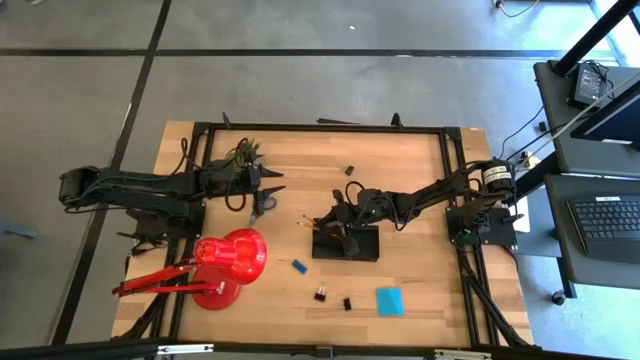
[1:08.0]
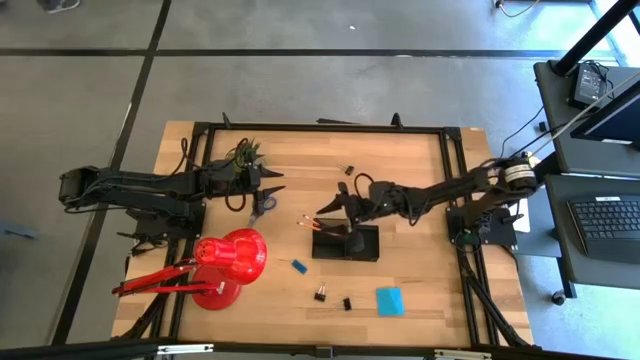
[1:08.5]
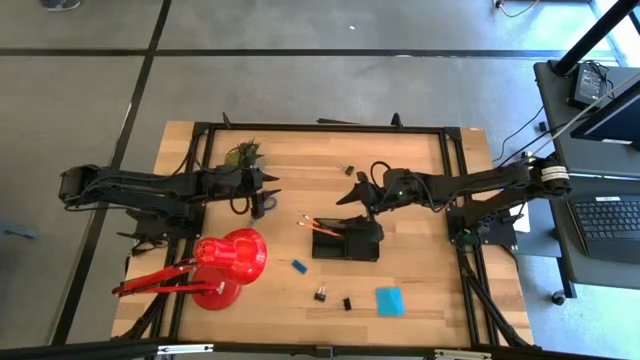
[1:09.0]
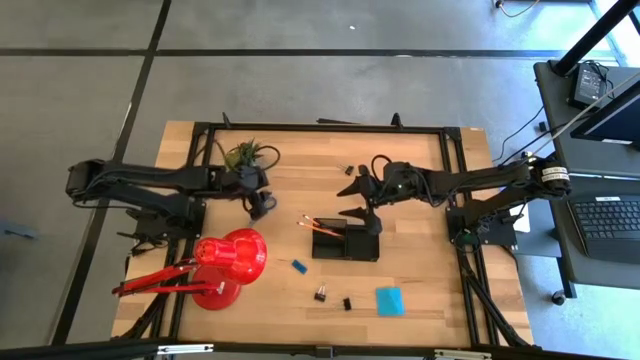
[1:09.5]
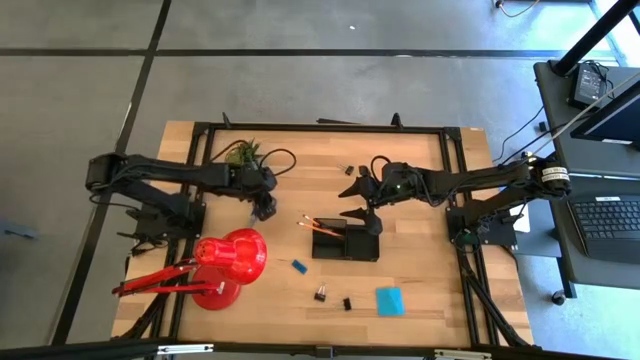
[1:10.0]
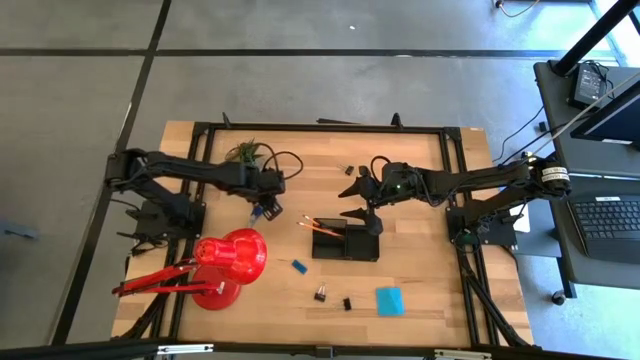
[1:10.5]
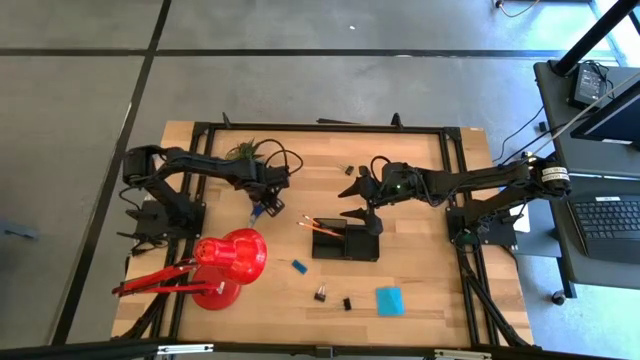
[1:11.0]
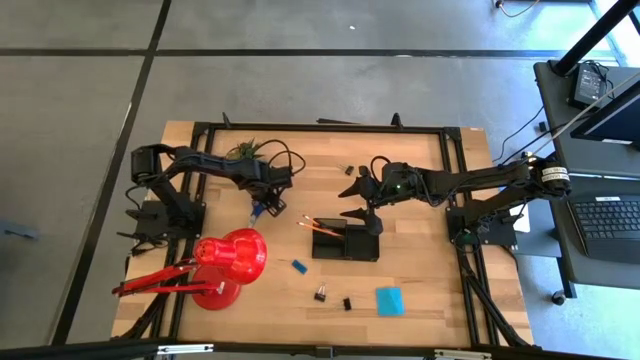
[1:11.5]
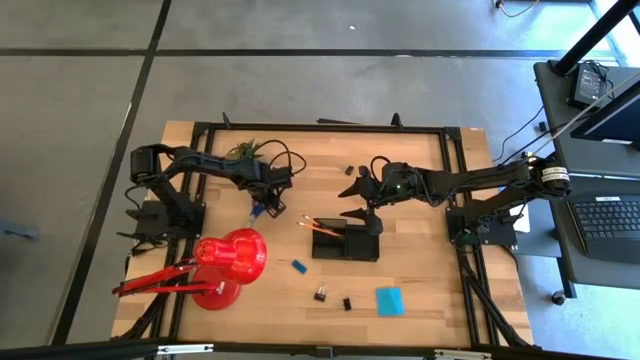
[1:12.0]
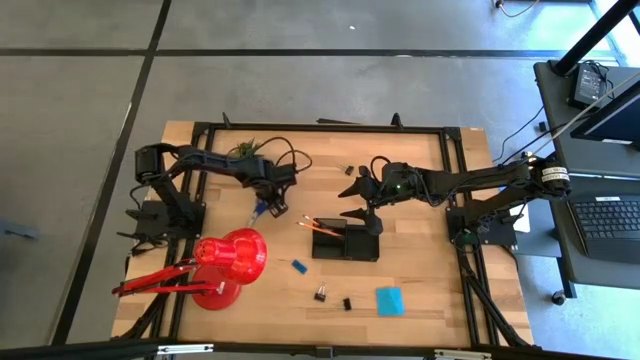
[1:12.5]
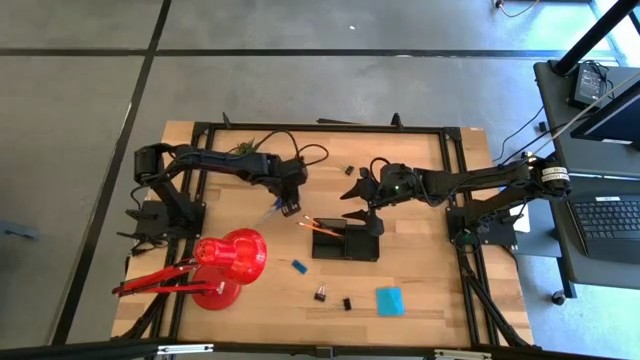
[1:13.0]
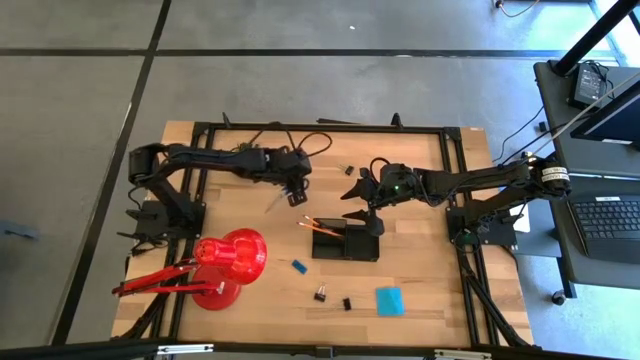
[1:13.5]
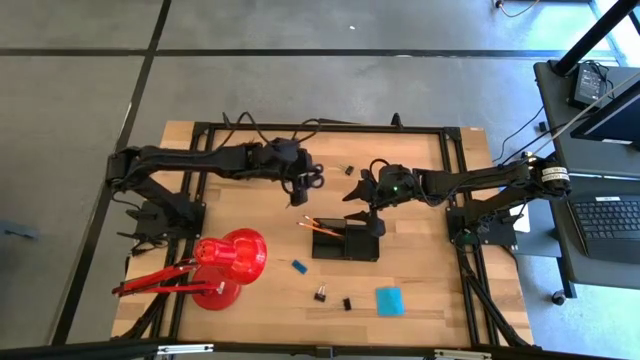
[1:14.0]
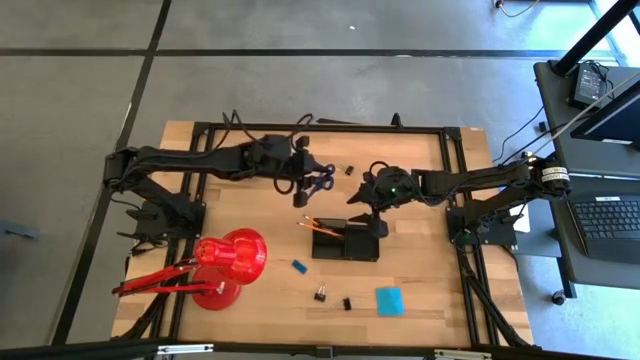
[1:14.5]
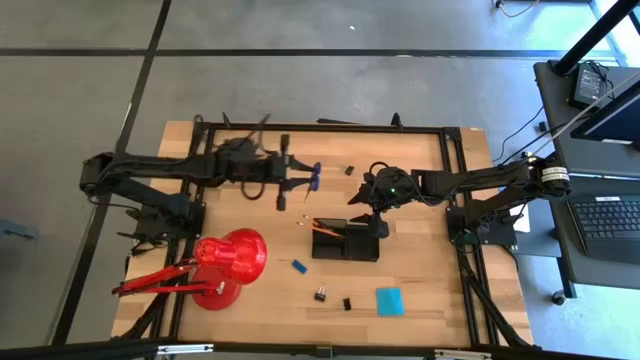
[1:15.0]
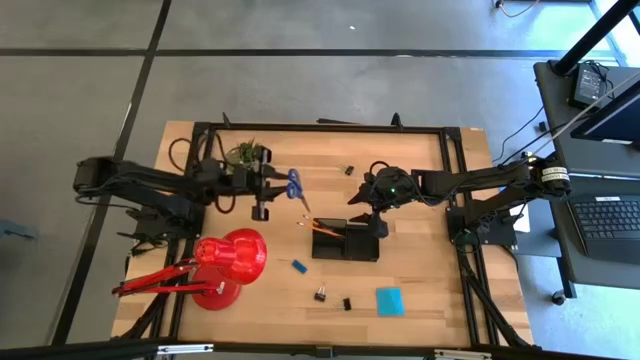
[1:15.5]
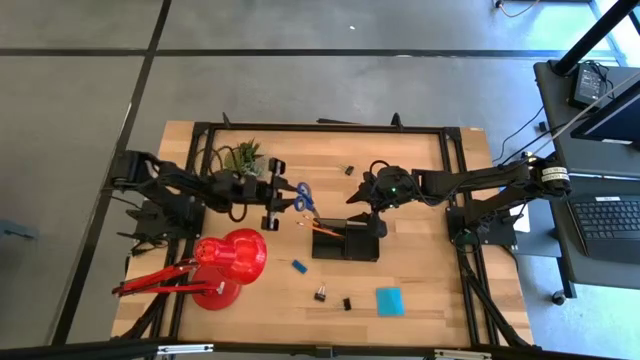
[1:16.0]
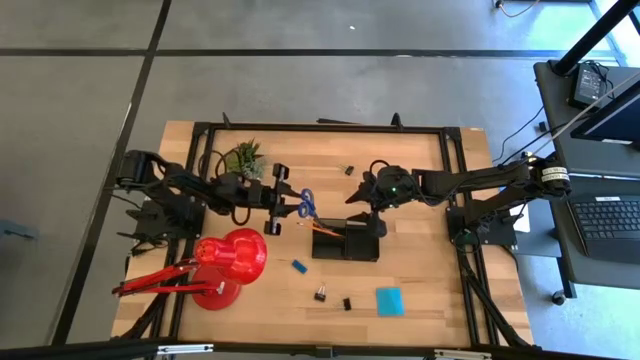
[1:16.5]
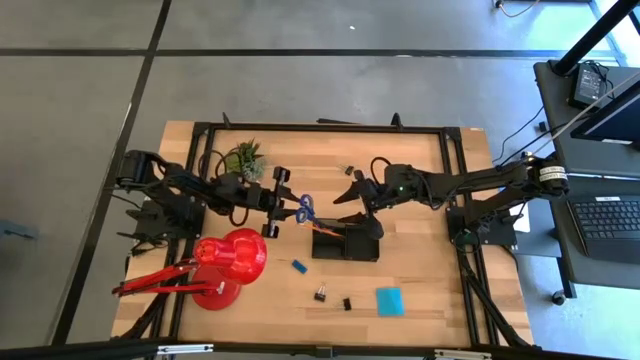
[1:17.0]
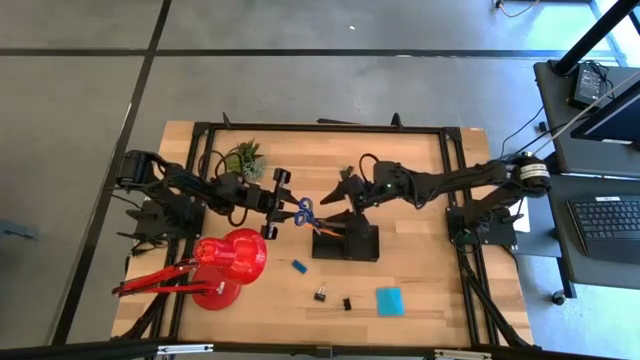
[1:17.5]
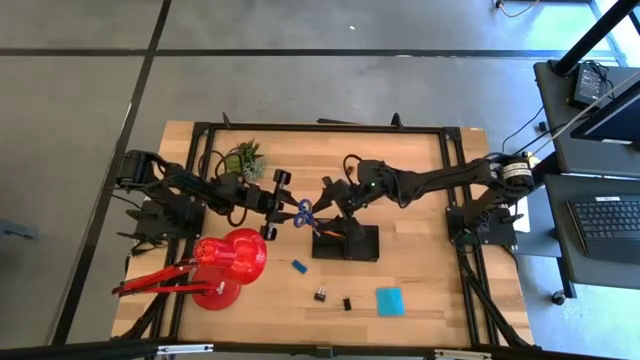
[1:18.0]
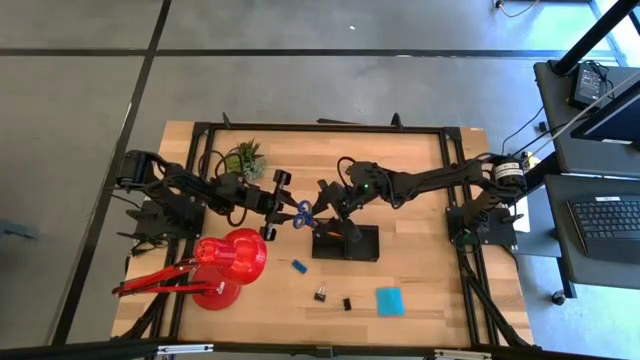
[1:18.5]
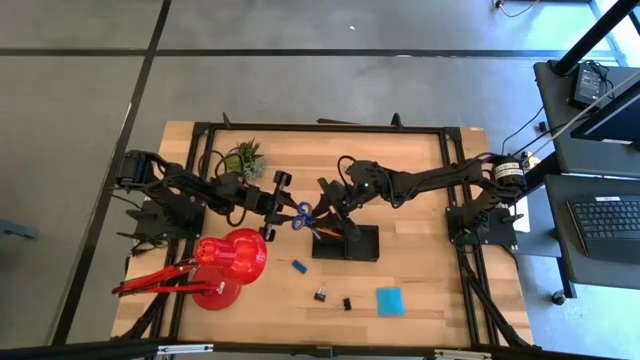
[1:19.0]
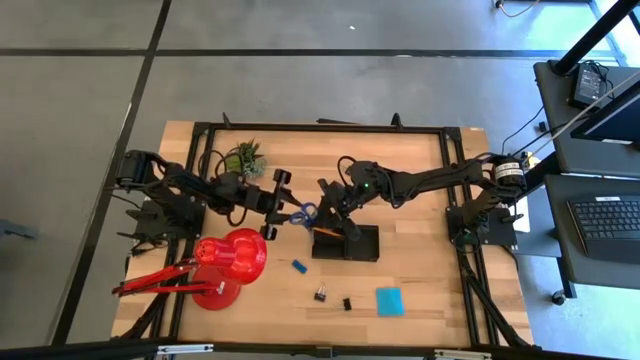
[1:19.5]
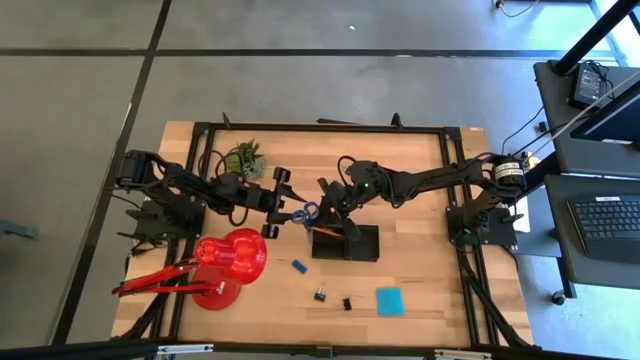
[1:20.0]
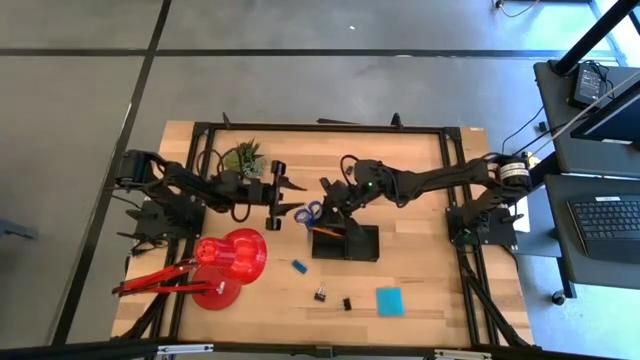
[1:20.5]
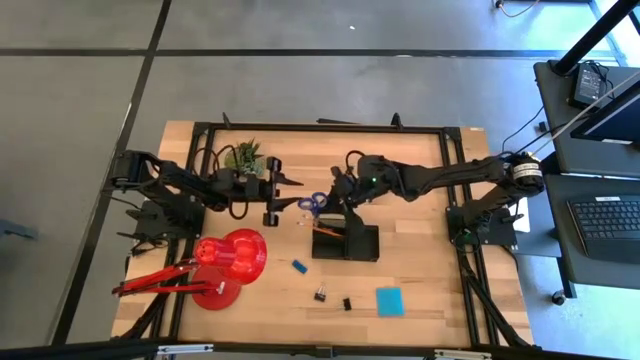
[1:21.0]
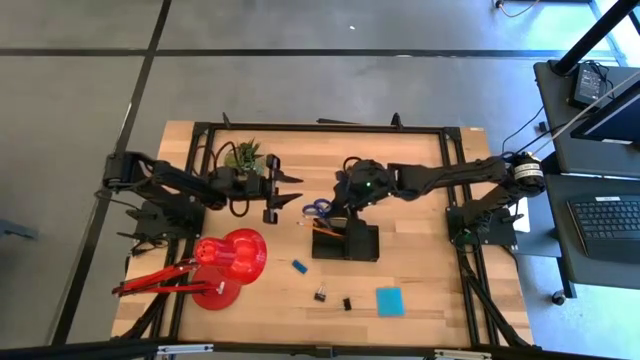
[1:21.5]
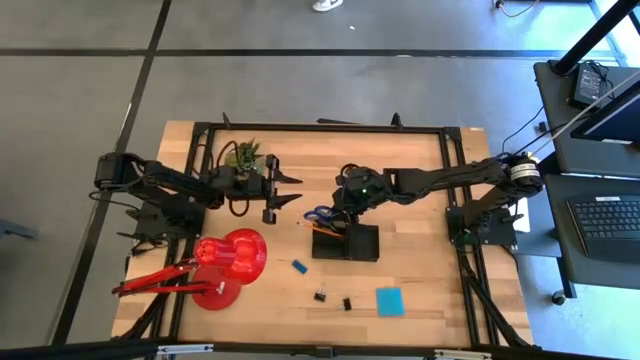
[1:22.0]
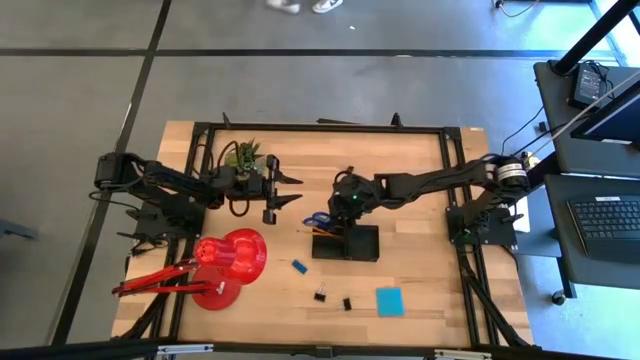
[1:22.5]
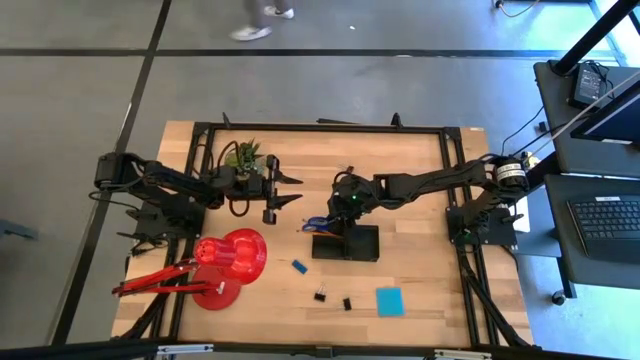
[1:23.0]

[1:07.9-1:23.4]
Task: Pick and place office supplies into organizer
Put the blue scissors into the black desk organizer

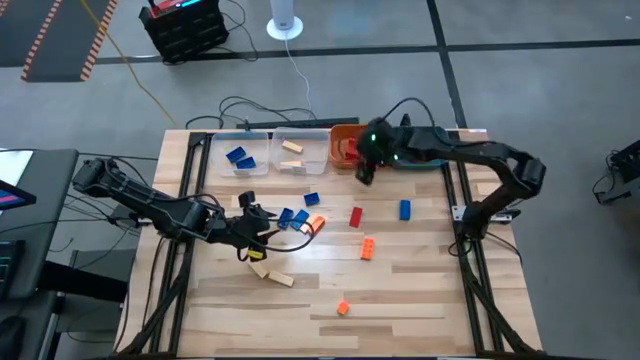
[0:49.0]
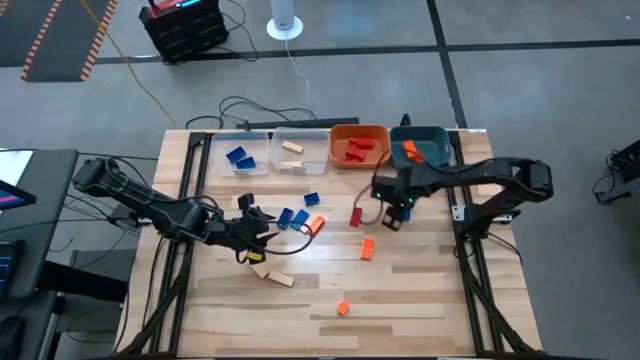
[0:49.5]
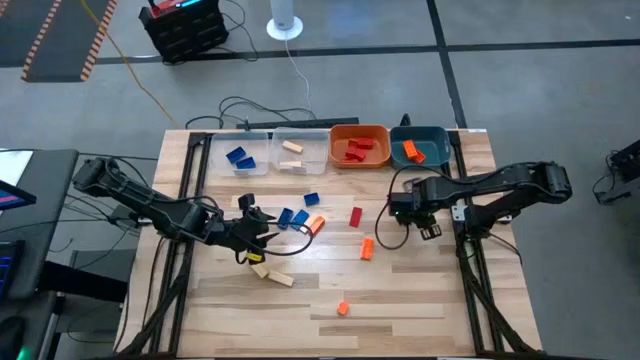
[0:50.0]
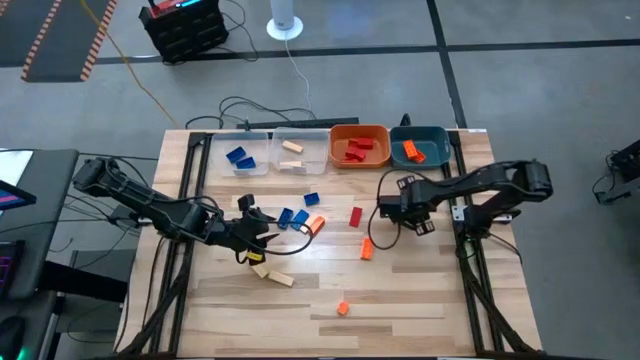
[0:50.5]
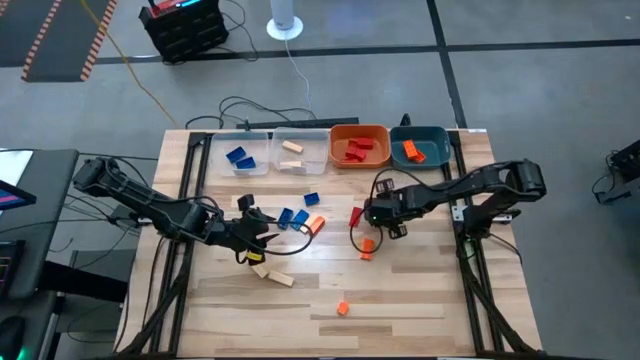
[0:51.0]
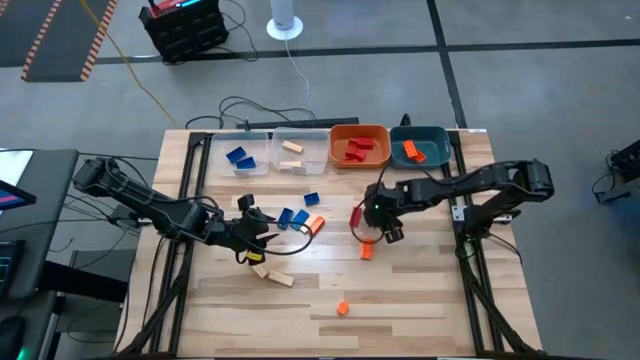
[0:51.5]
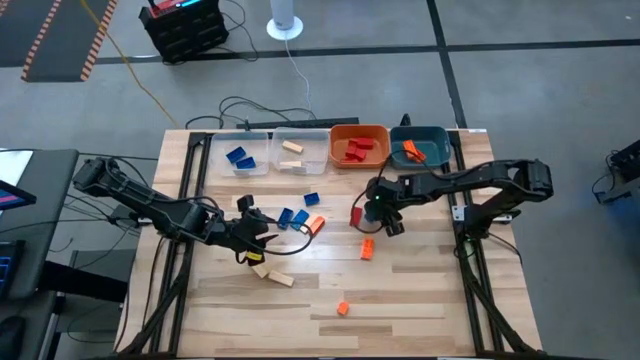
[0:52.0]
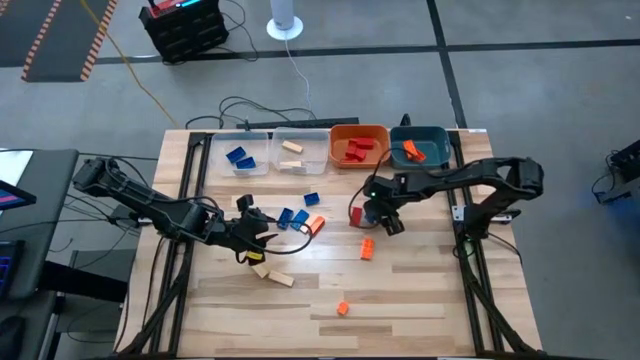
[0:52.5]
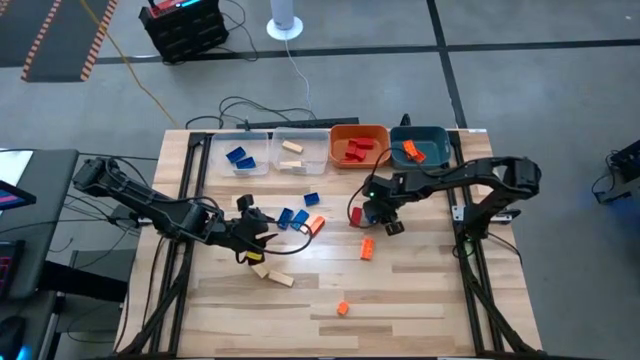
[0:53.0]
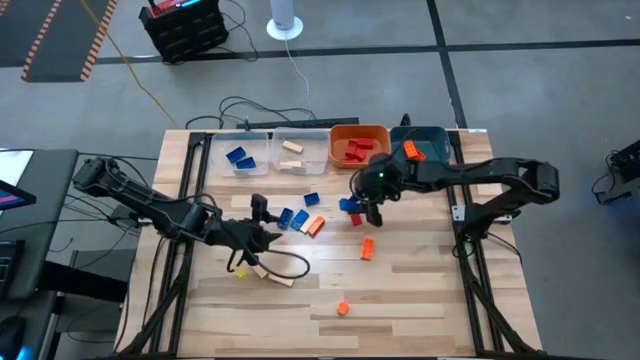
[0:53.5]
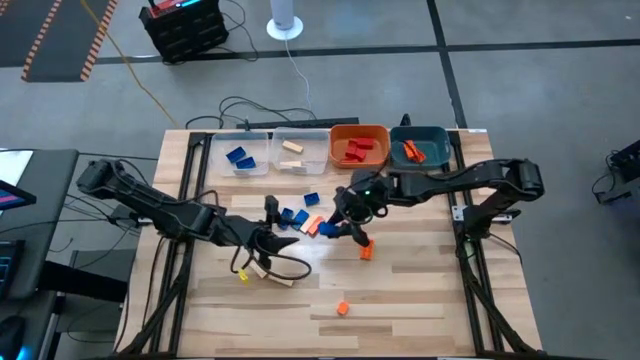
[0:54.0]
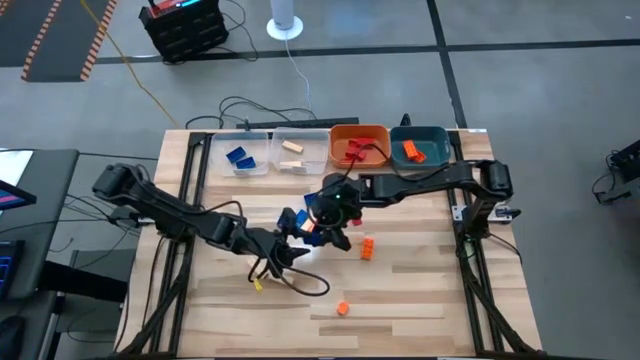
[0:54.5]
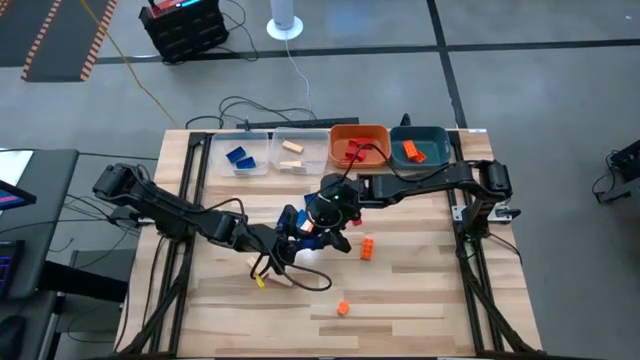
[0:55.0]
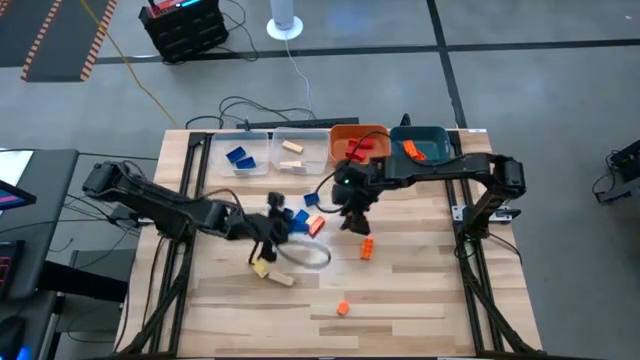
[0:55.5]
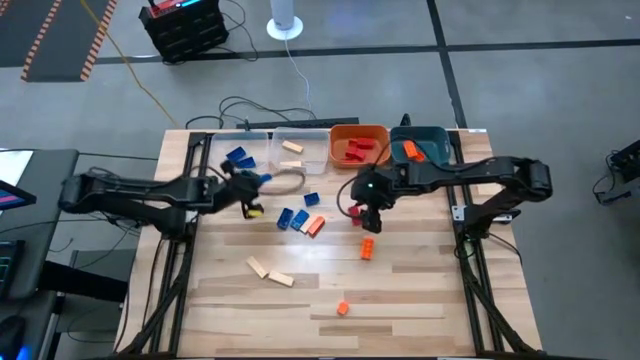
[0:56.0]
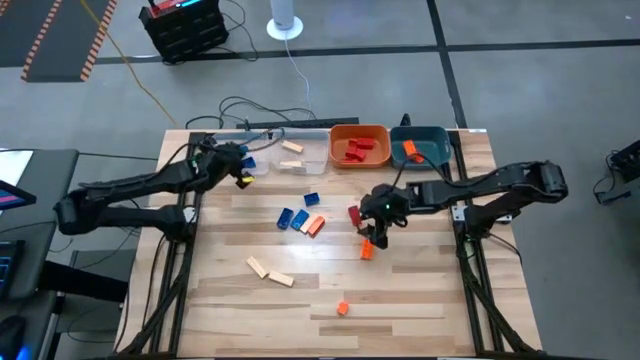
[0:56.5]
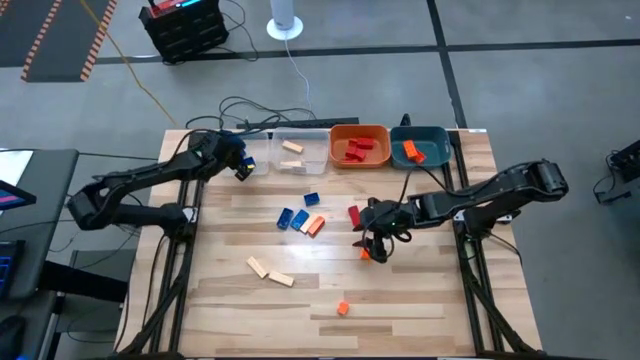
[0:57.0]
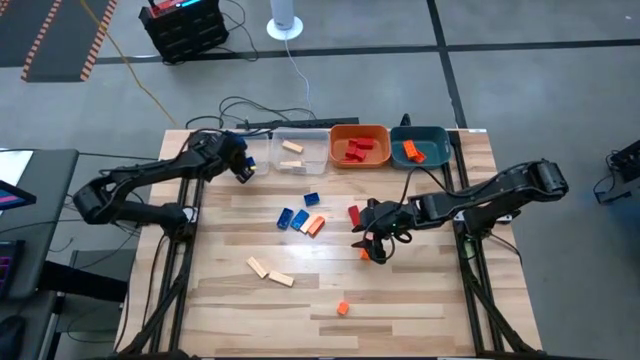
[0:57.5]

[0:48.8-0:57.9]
Task: Sort blocks
Put the blue game piece into the left transparent bin
